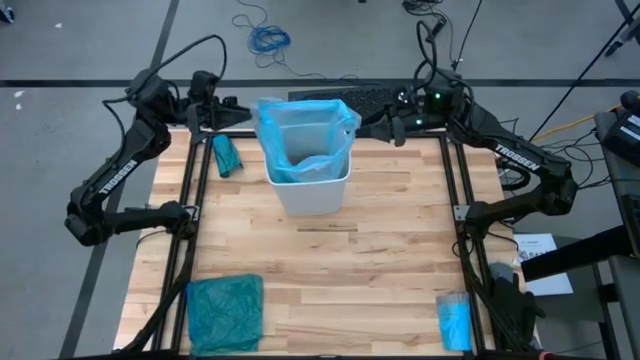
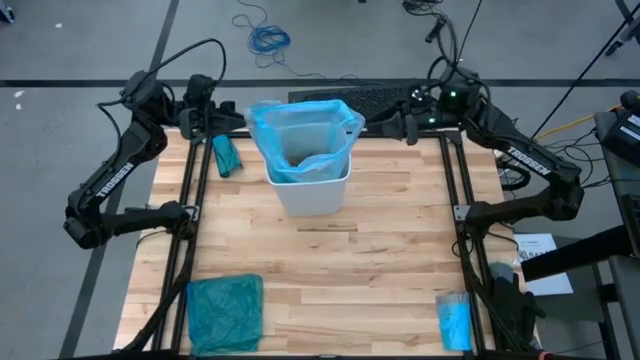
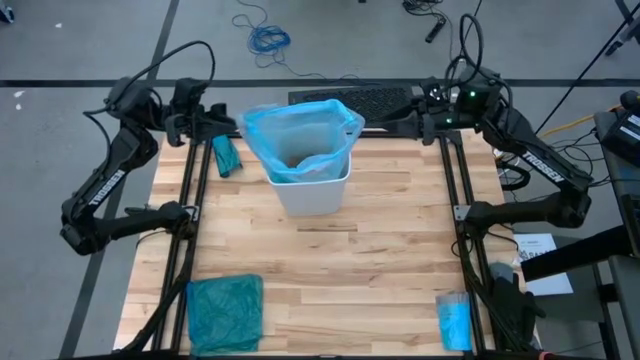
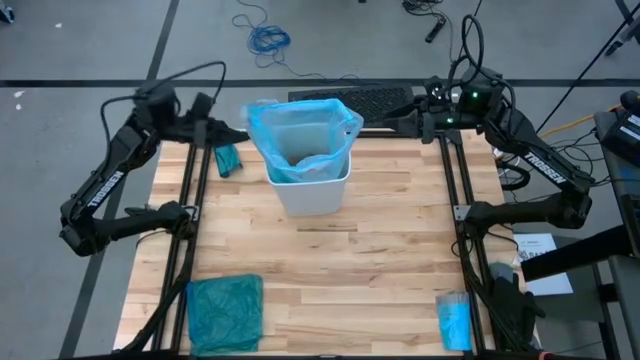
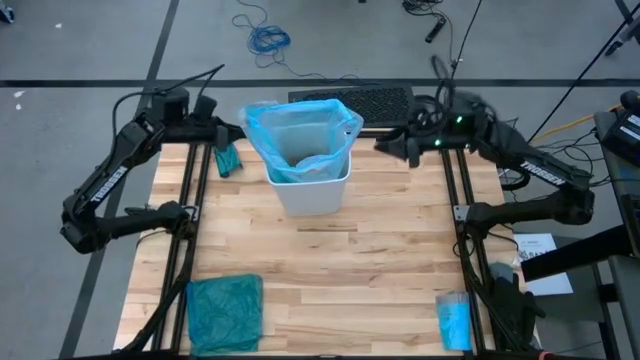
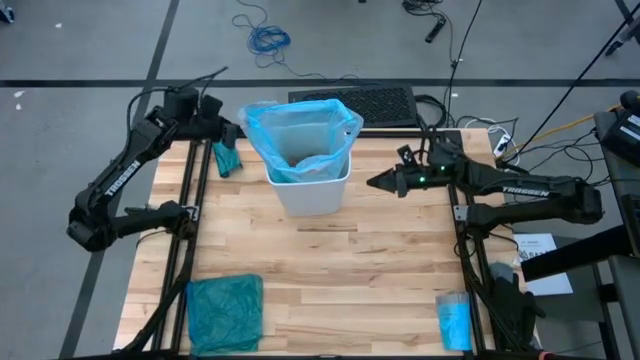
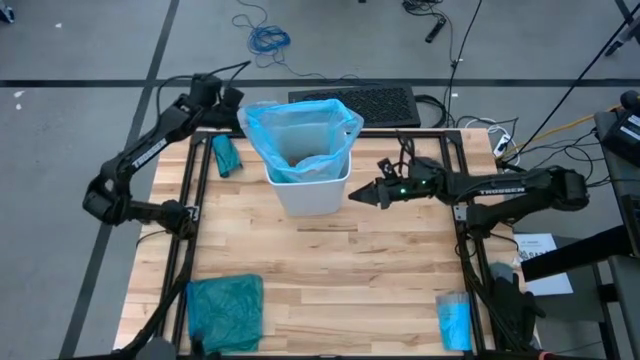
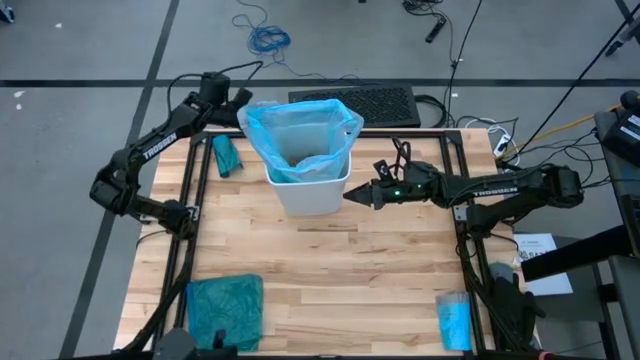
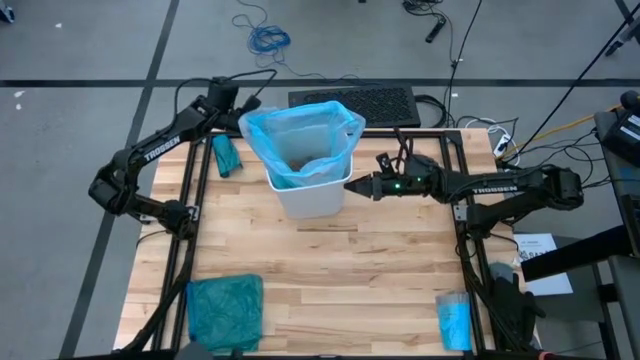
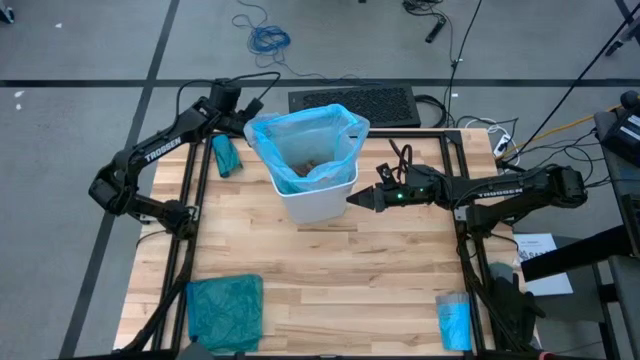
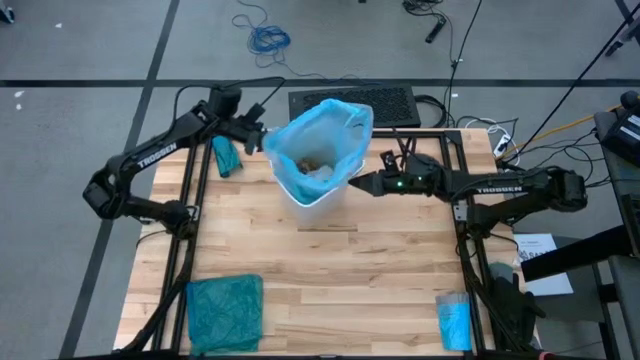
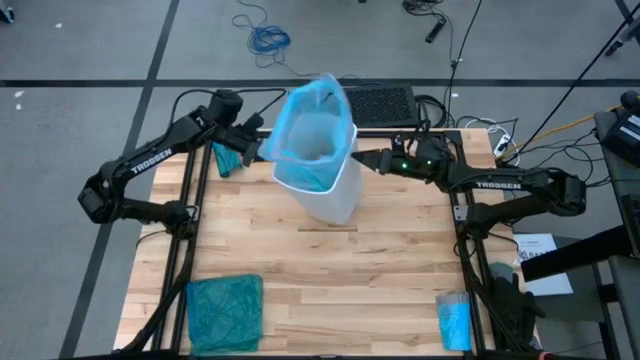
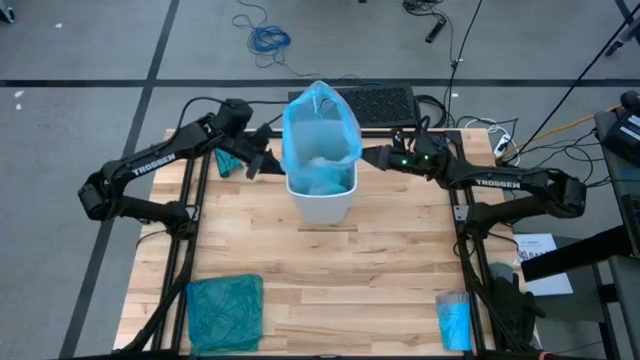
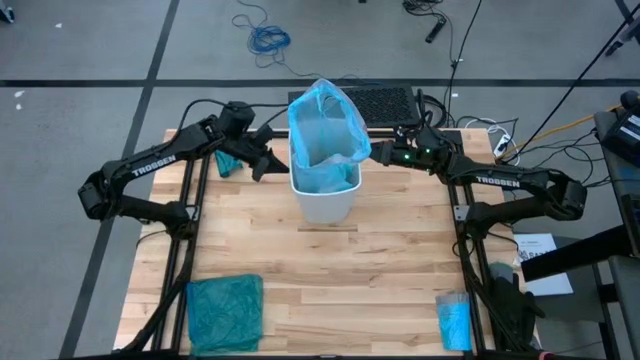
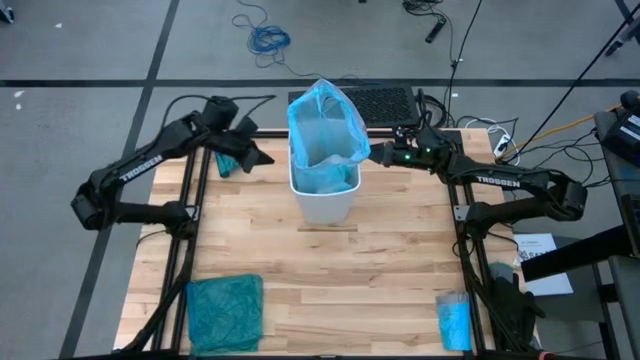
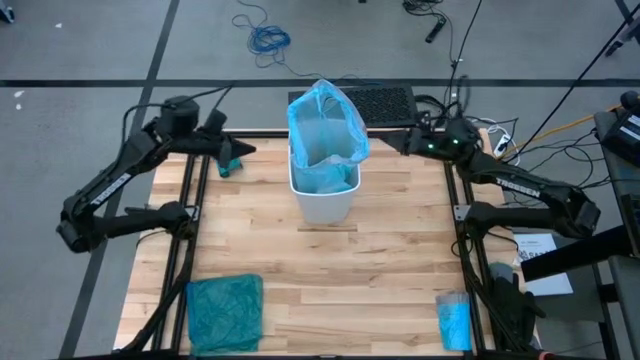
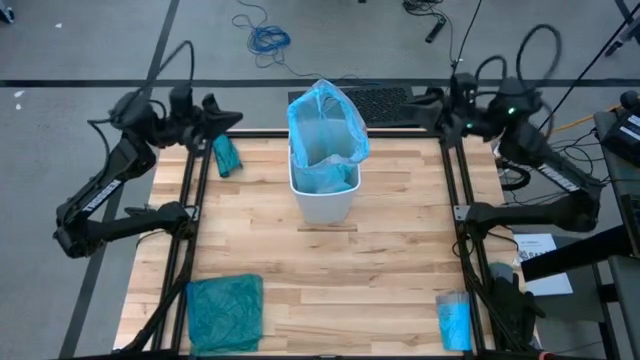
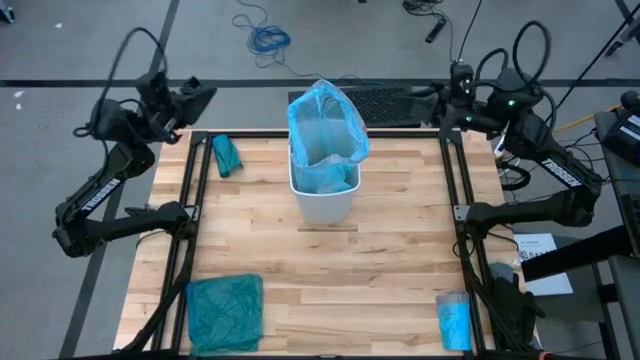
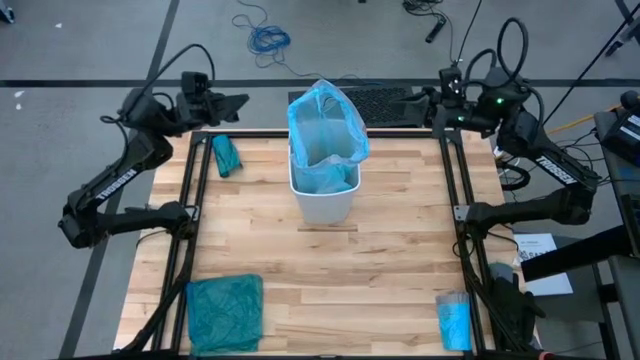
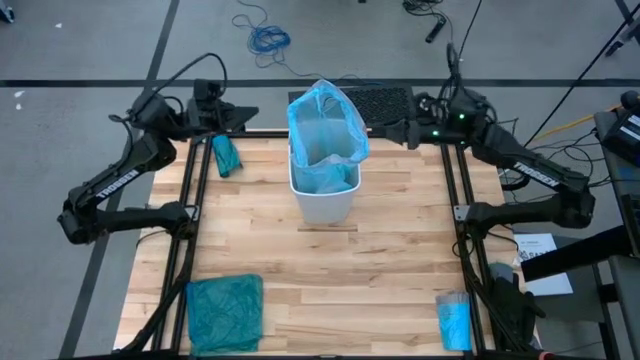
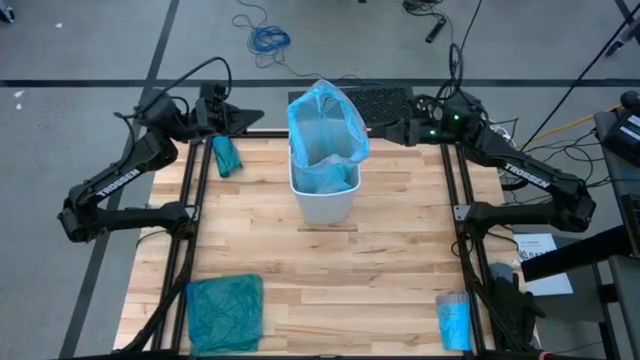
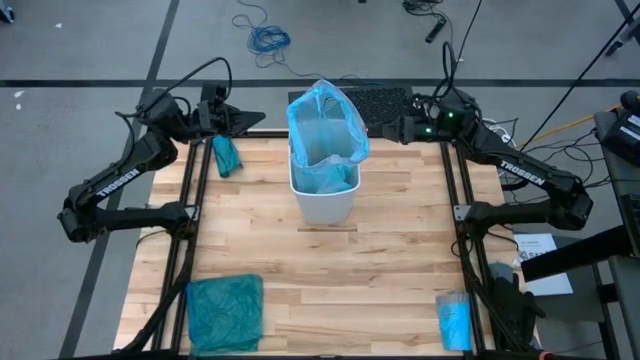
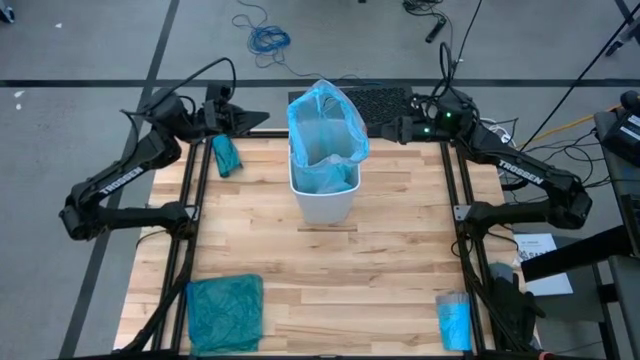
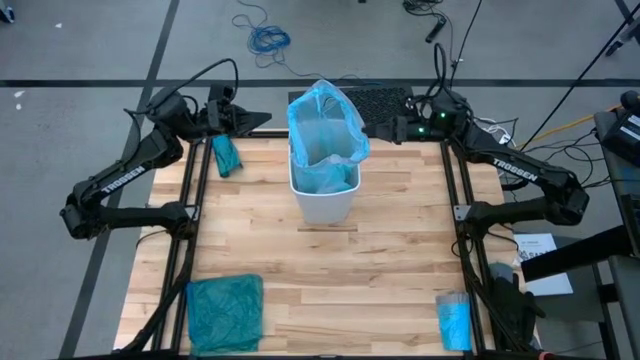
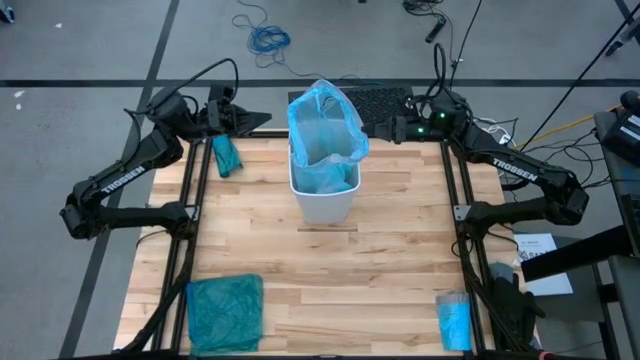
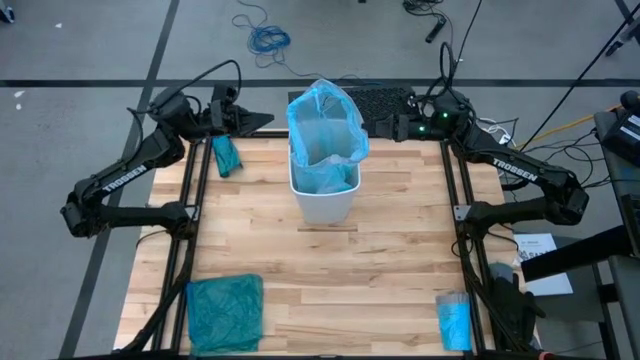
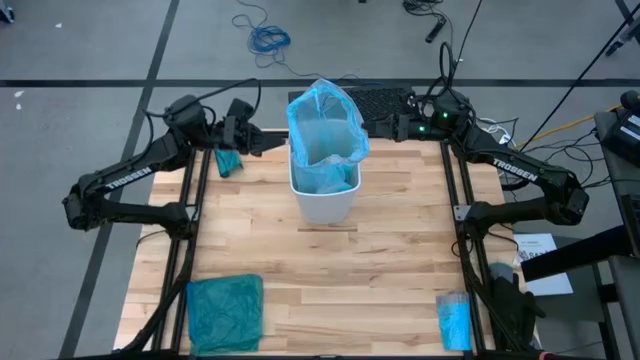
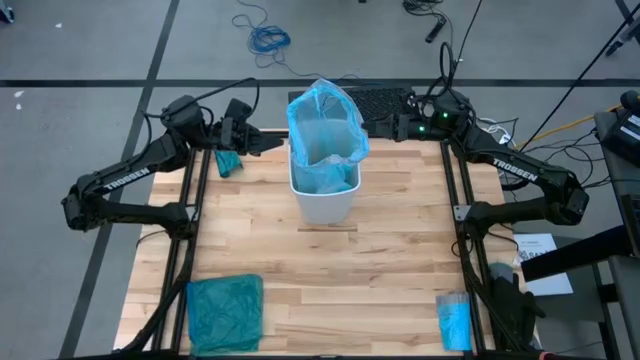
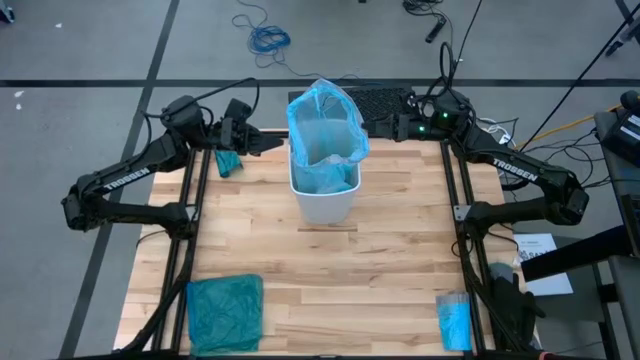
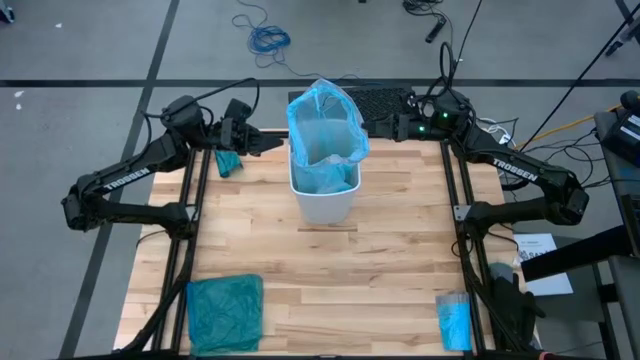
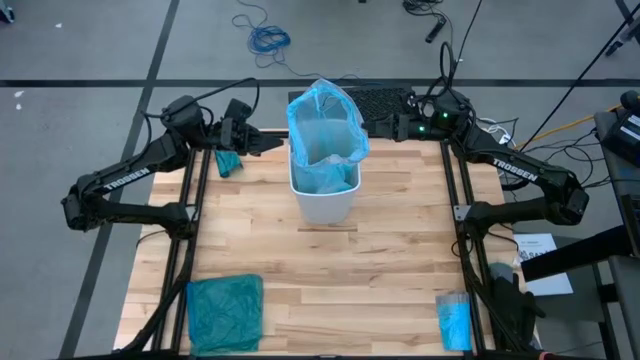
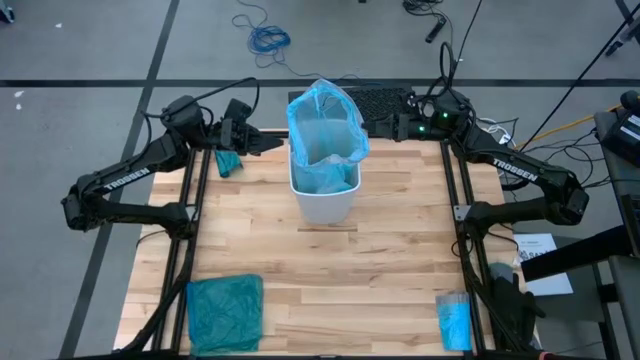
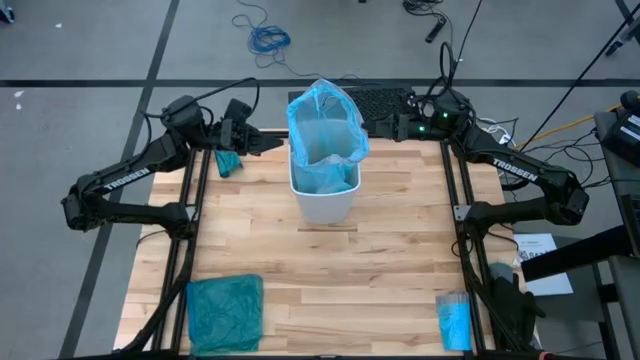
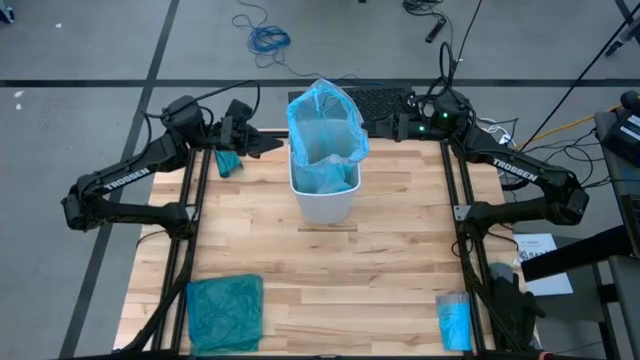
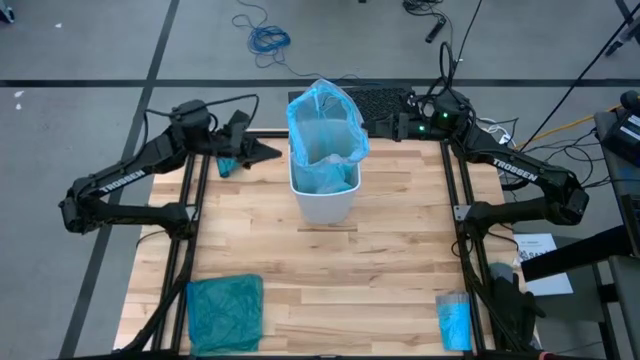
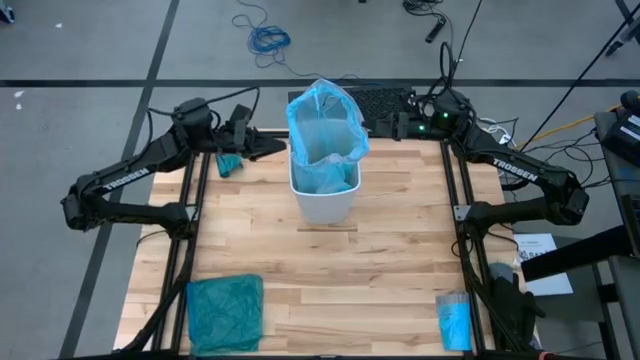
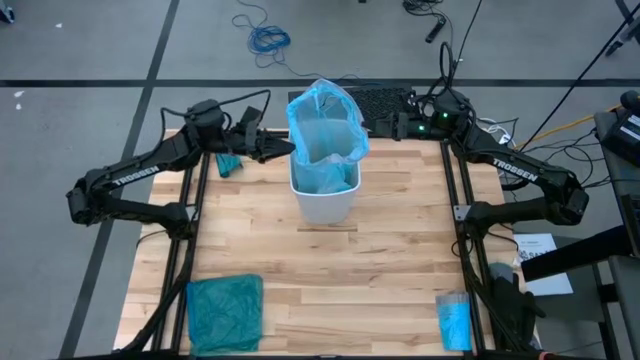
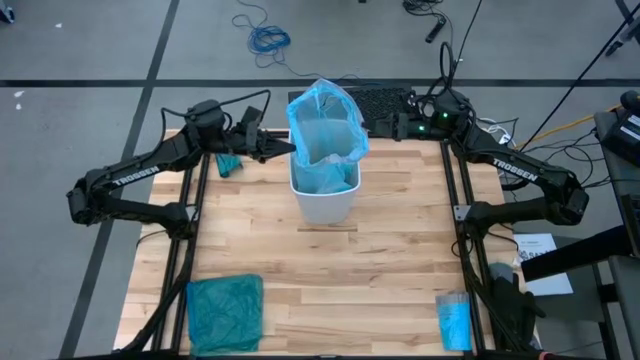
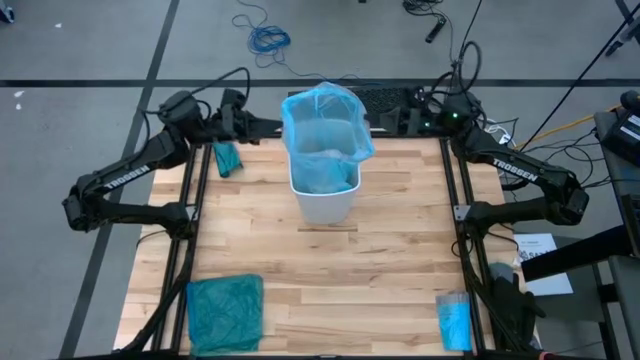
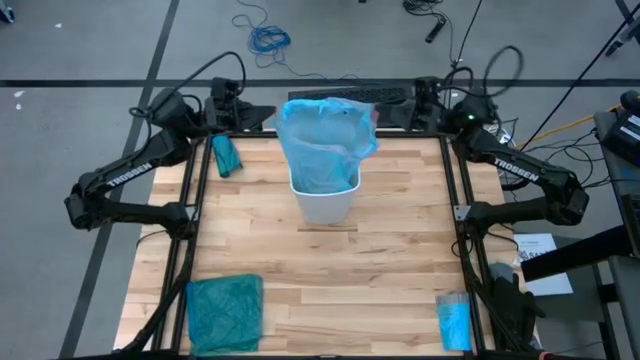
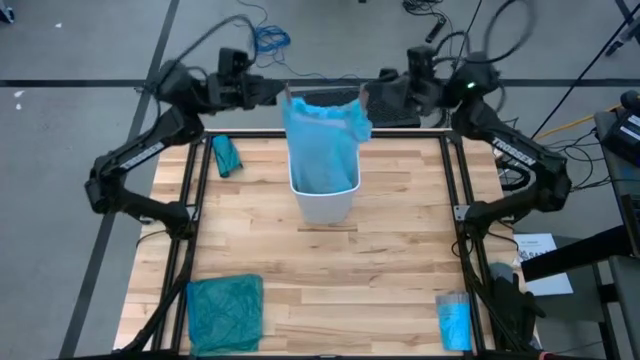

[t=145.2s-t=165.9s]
Task: place trash/remove bag and relplace
Remove the blue trash bag from the white trash bin
